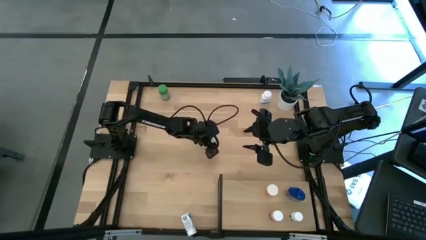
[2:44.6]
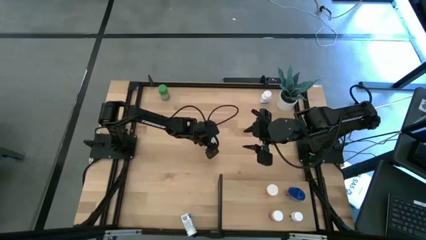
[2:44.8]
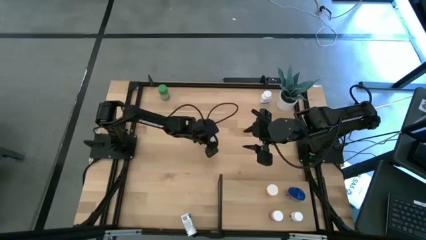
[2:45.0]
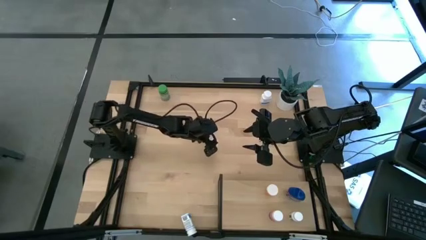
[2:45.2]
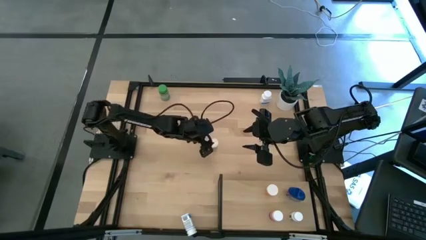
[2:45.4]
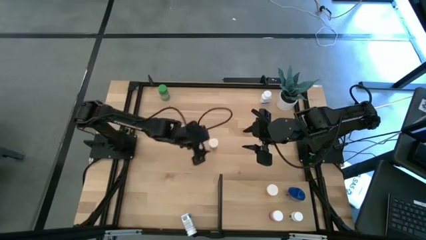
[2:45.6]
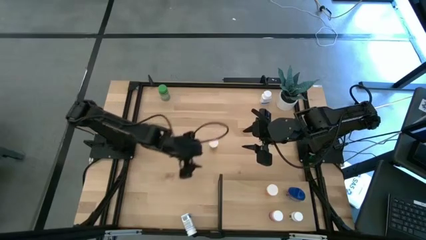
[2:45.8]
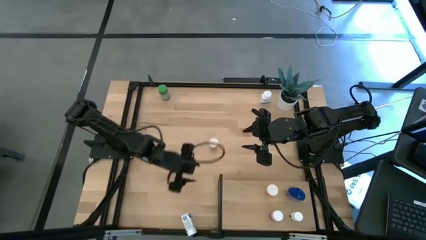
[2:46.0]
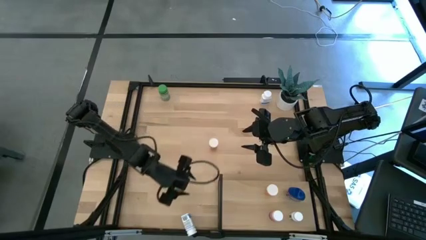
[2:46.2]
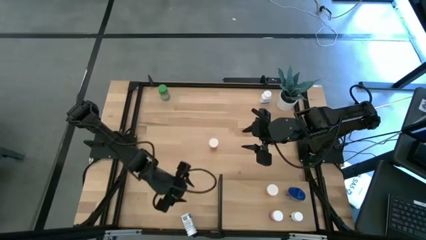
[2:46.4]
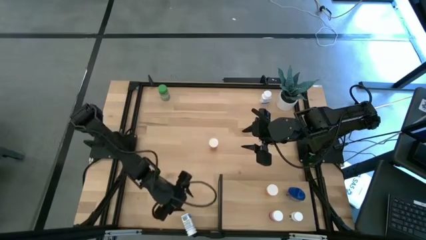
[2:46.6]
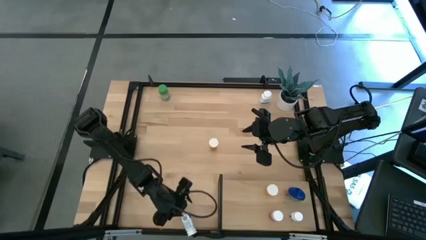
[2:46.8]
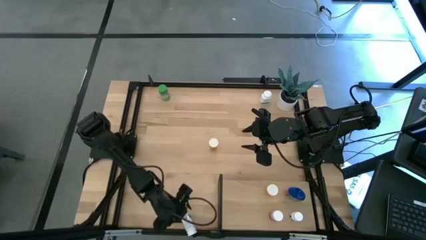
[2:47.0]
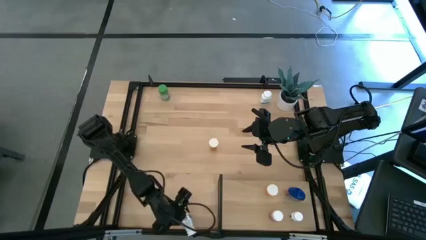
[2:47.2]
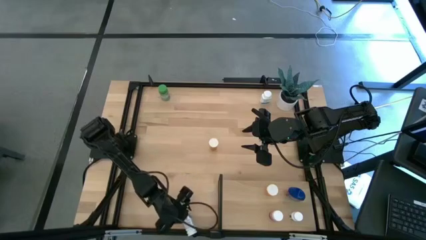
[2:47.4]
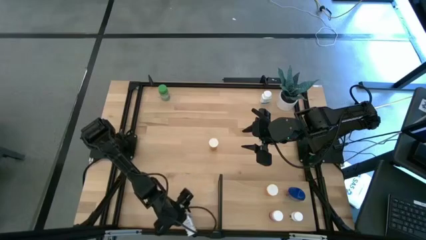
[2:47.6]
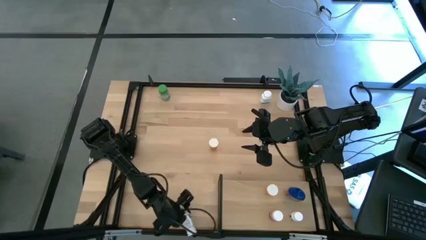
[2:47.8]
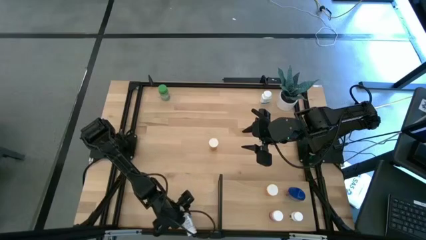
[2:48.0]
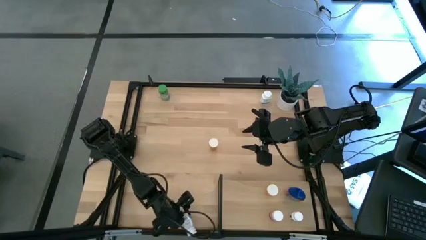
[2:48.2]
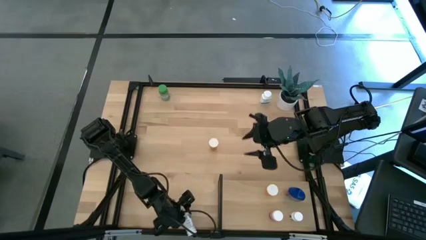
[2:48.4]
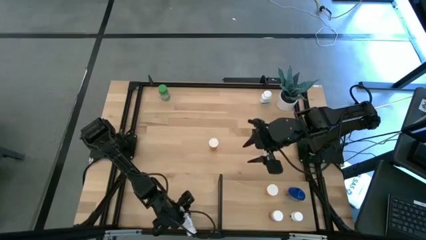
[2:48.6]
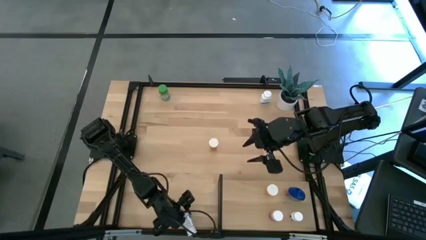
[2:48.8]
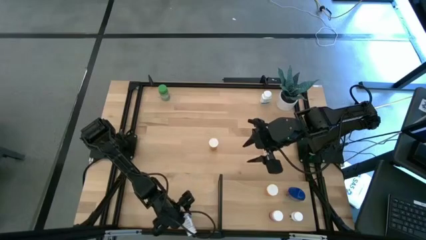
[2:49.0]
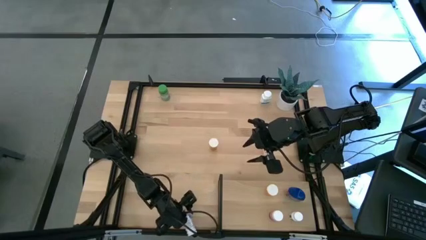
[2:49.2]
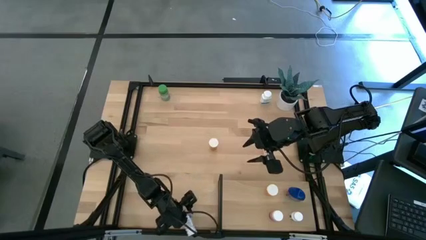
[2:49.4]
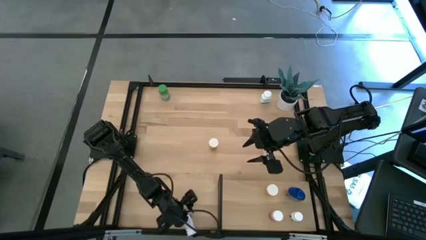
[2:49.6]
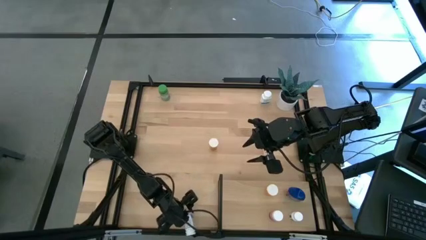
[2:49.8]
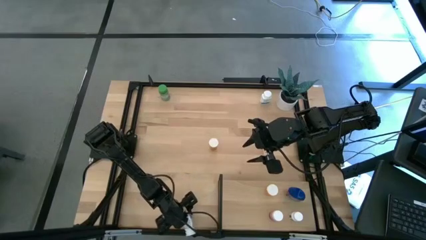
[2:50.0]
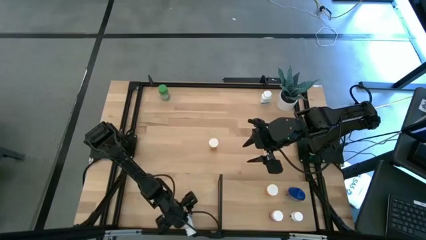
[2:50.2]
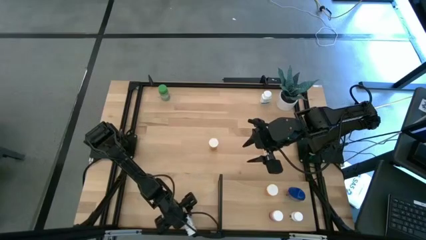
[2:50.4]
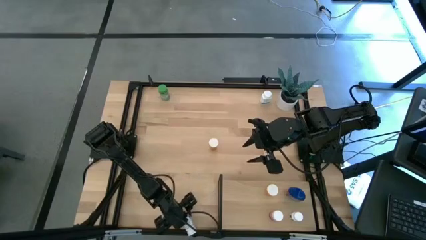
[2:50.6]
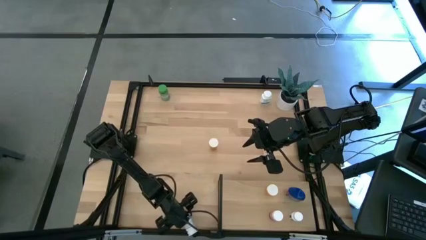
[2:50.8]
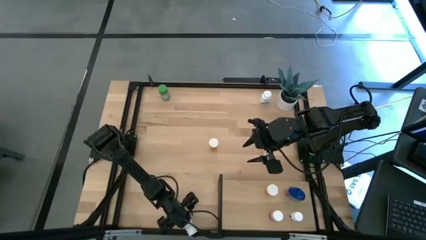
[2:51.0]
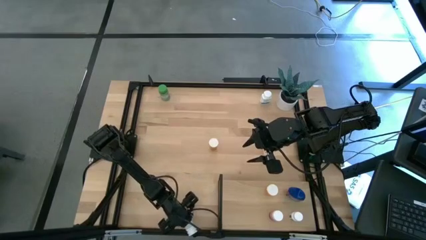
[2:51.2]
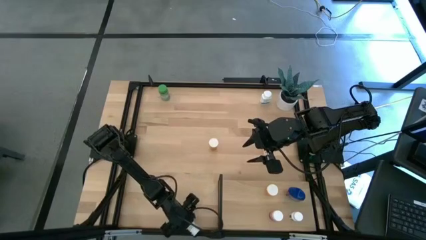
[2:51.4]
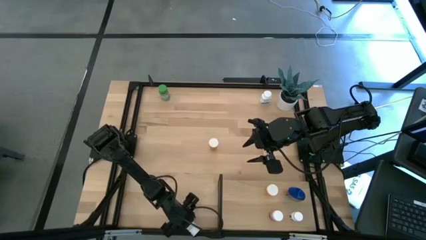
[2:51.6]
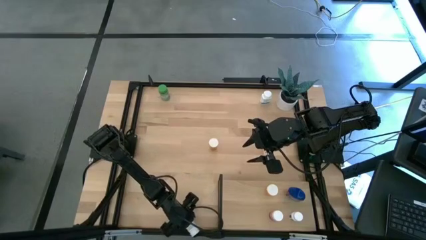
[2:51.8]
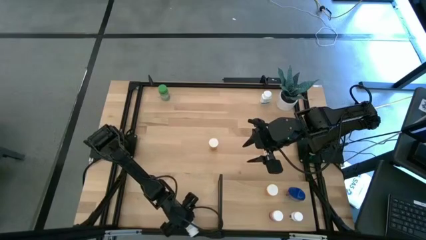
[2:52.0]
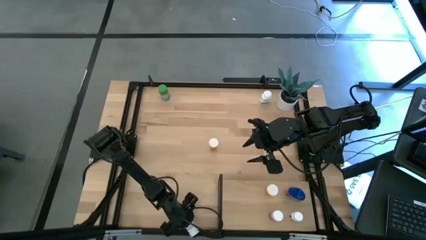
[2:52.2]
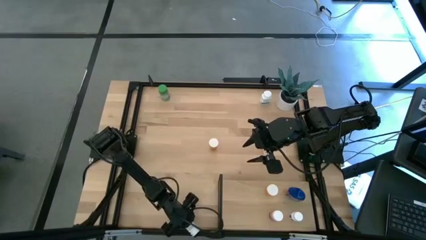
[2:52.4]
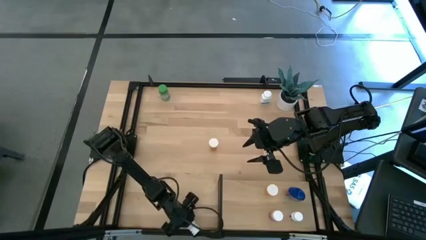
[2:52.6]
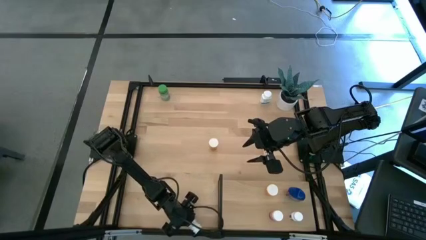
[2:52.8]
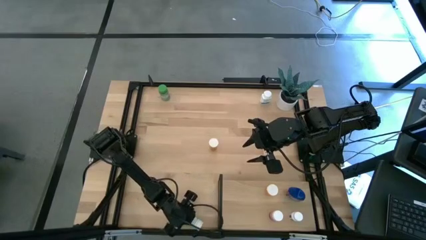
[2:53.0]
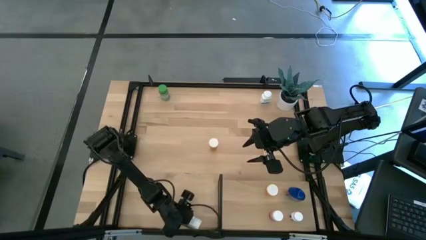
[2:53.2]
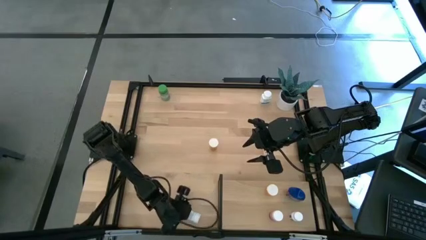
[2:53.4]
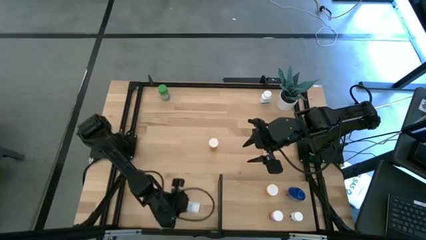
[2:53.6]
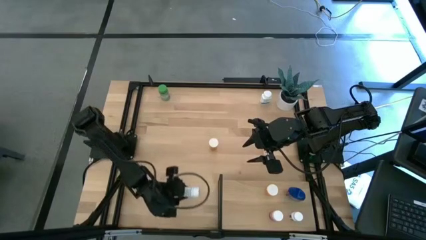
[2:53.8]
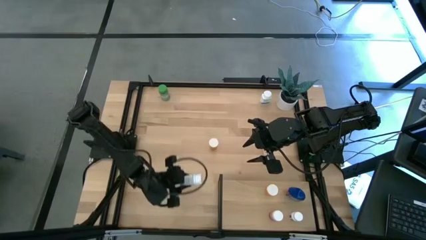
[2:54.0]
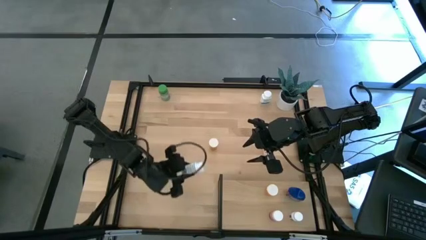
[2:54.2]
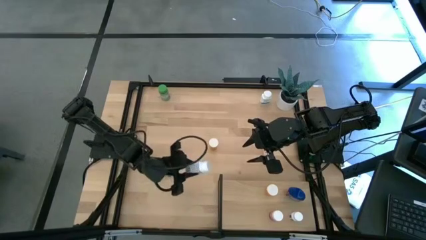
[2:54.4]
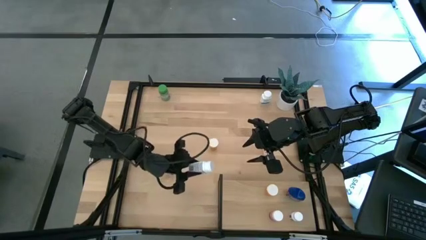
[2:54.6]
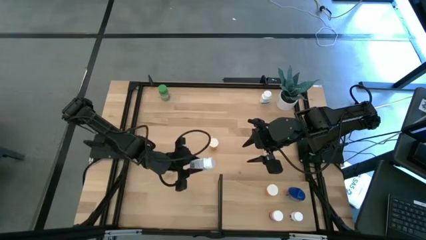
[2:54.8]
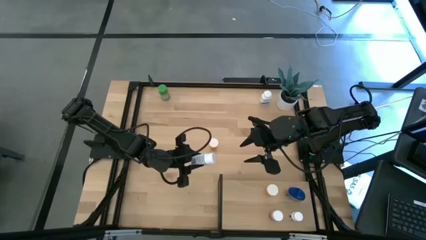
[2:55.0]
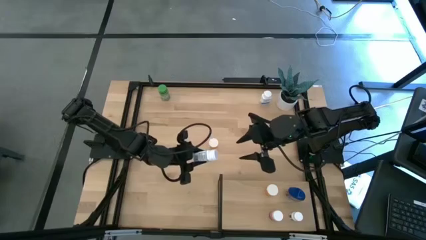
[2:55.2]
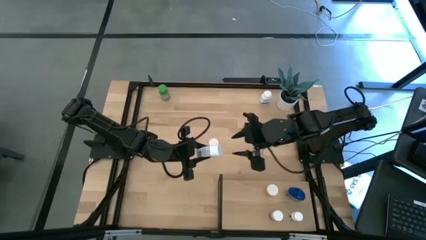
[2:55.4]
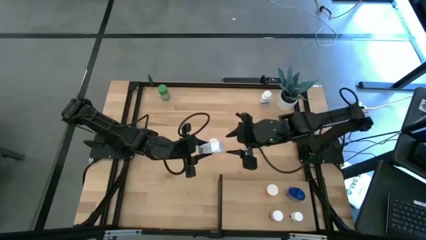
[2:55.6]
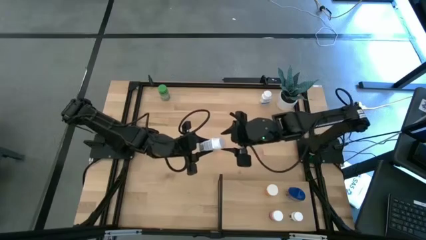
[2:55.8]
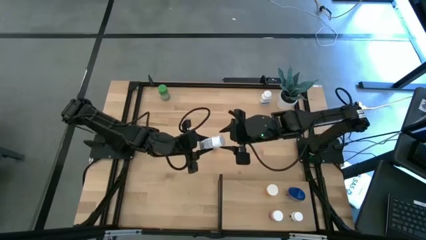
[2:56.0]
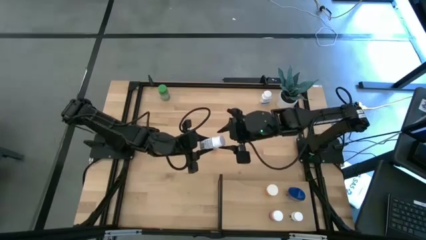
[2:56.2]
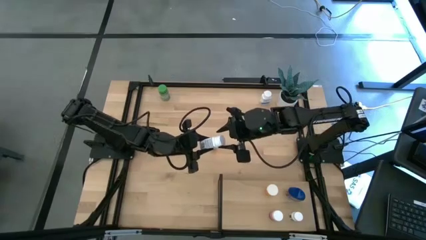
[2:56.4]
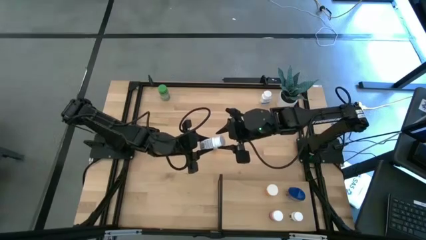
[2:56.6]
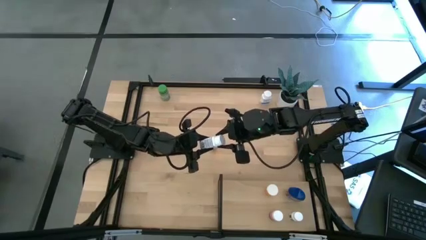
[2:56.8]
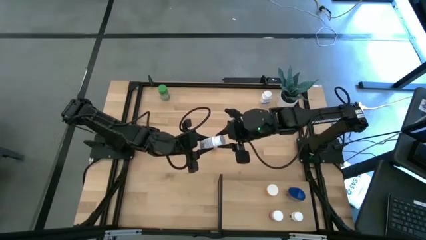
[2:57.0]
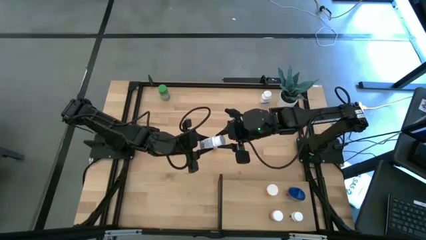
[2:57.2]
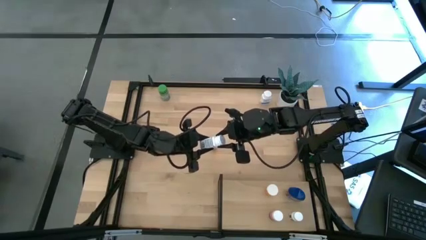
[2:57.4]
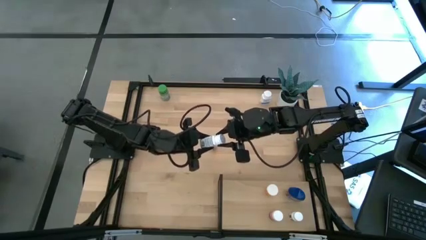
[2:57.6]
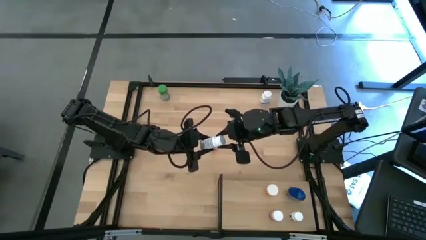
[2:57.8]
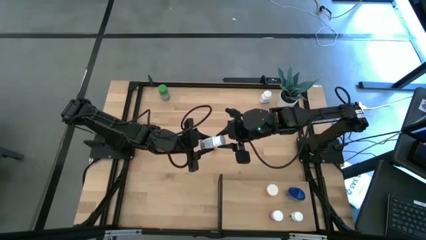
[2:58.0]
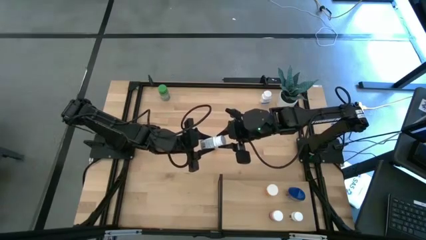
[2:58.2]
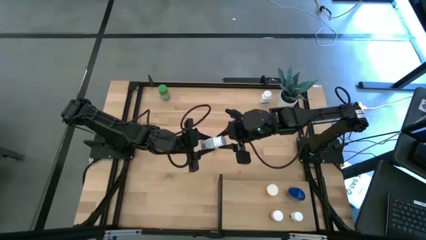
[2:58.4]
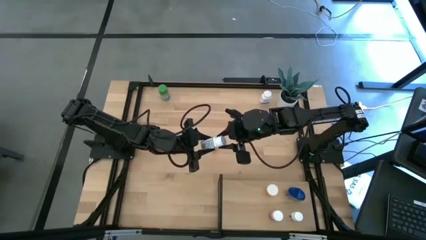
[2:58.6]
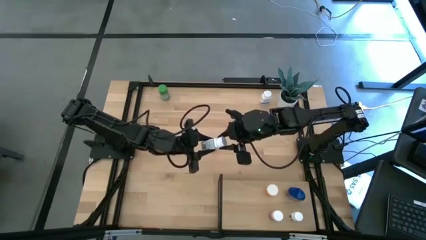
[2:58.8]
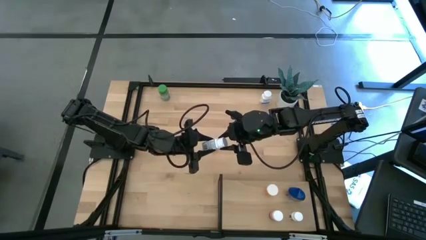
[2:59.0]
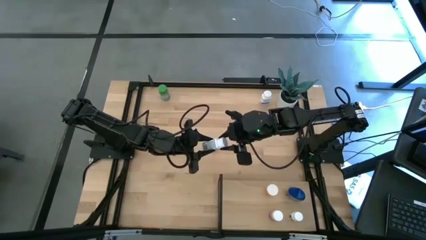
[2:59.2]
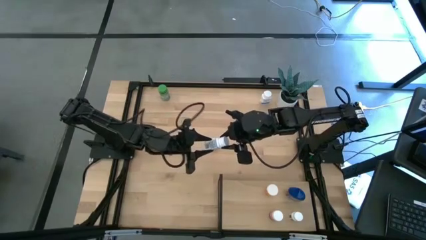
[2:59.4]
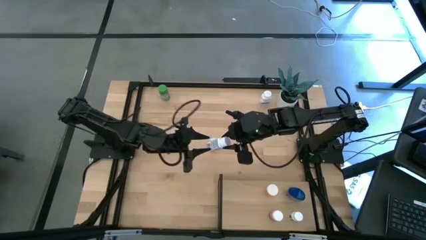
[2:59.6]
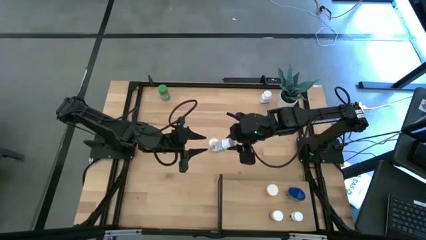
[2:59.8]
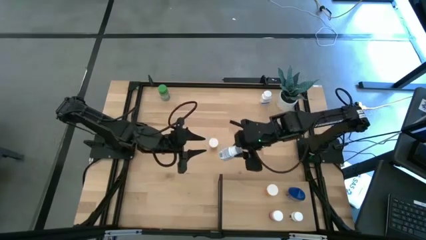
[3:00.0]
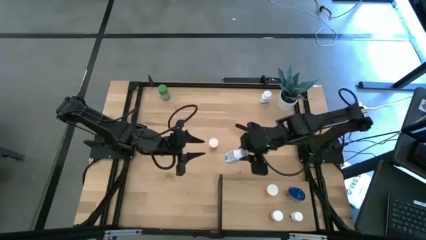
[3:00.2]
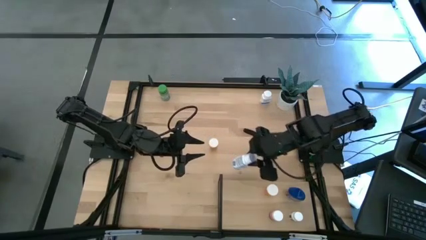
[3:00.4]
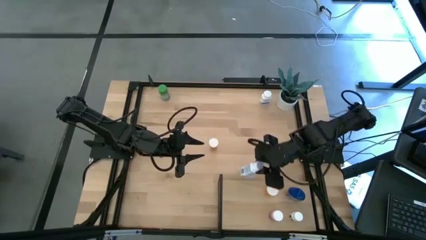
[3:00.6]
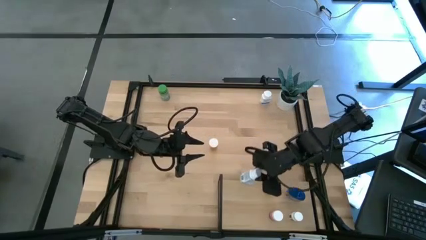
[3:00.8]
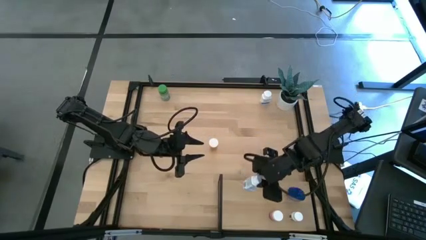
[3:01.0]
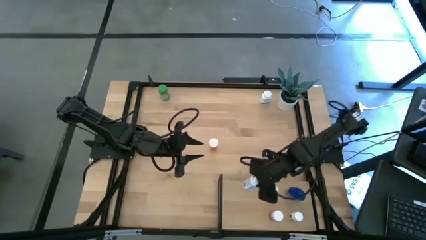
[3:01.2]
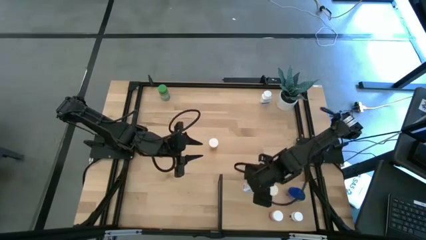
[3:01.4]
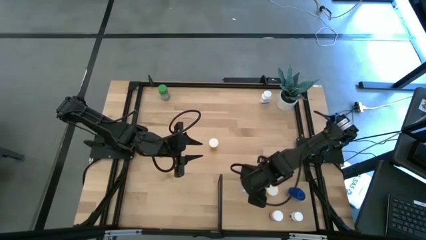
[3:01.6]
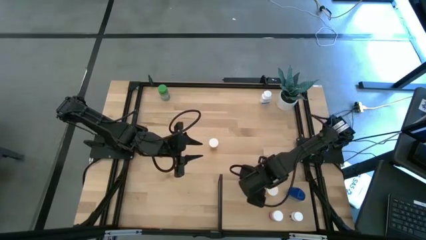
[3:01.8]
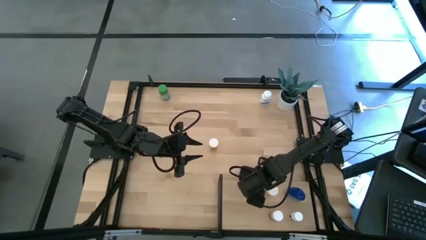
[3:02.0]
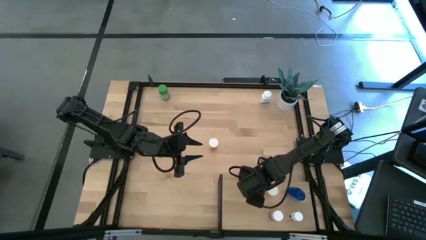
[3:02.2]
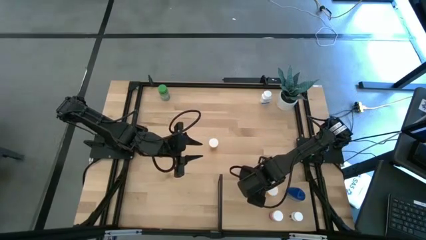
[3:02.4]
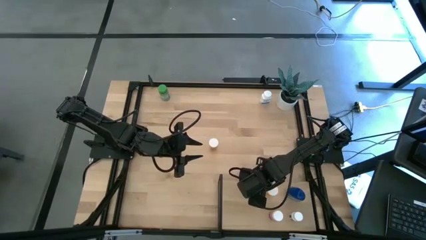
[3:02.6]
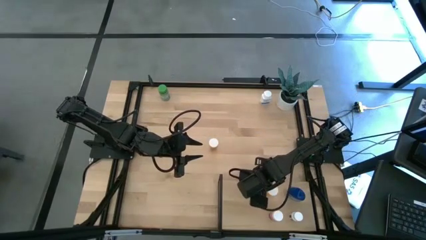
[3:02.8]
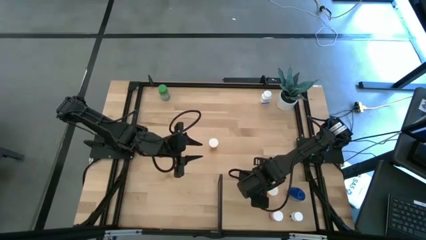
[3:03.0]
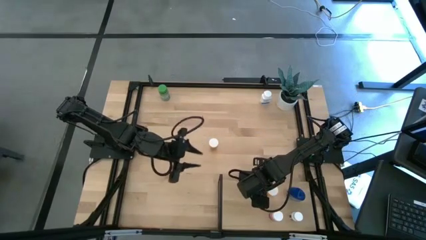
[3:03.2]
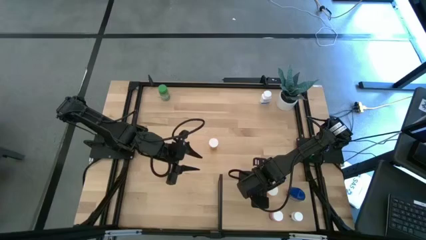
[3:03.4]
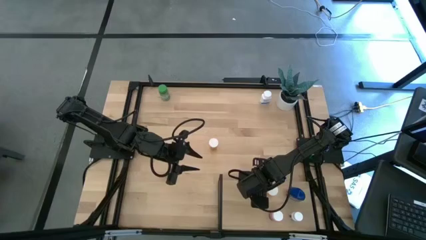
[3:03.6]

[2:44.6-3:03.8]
Task: Pick and place medicine bottles onto shelf by color
Put the bottom white pill bottle onto the shelf
